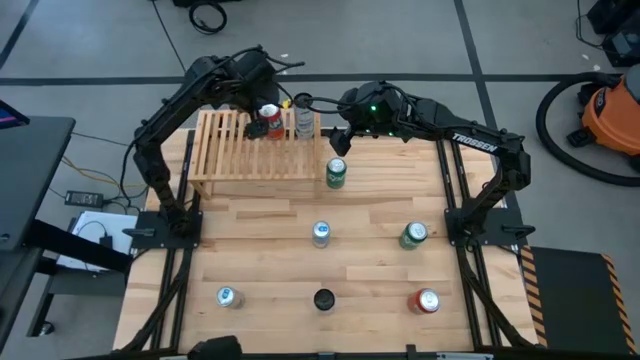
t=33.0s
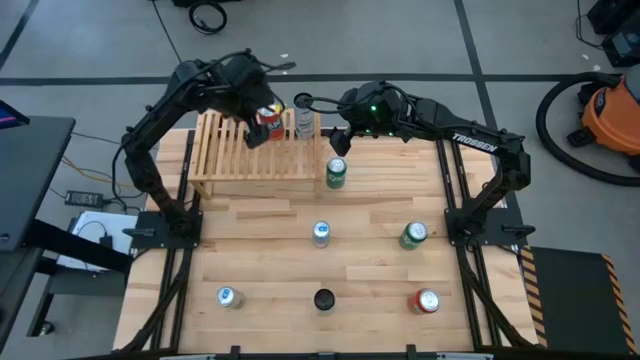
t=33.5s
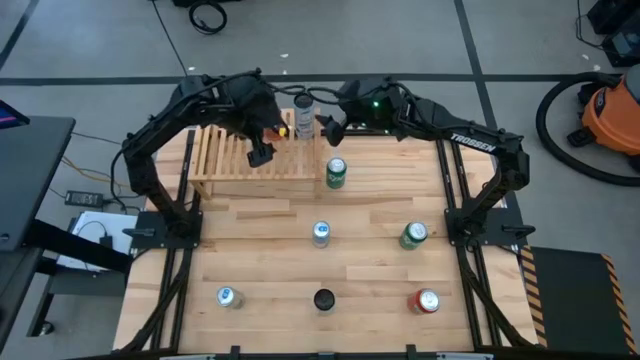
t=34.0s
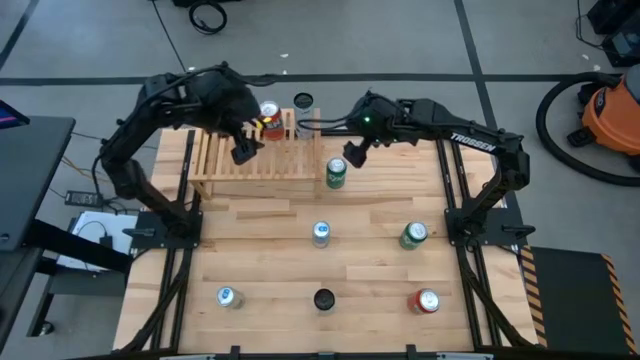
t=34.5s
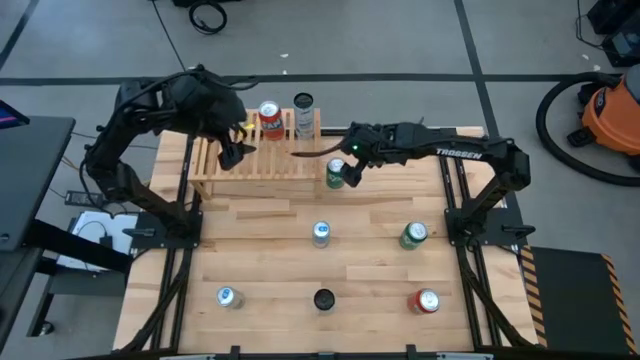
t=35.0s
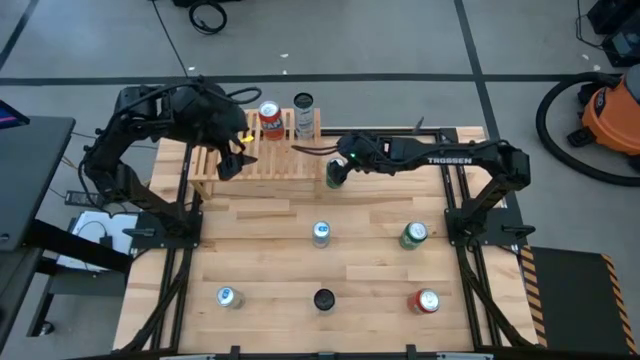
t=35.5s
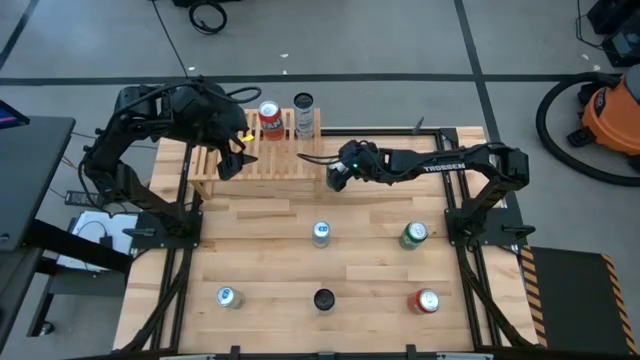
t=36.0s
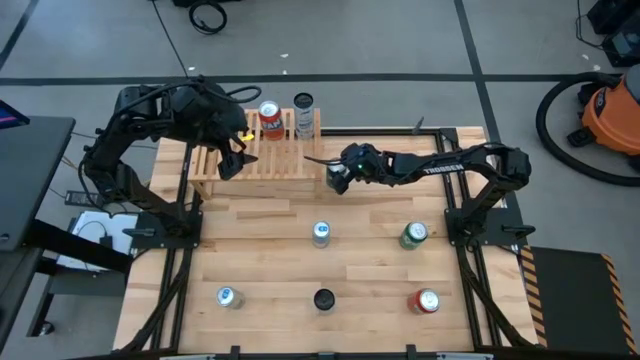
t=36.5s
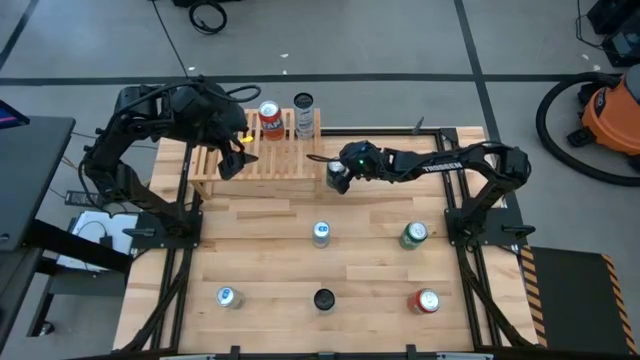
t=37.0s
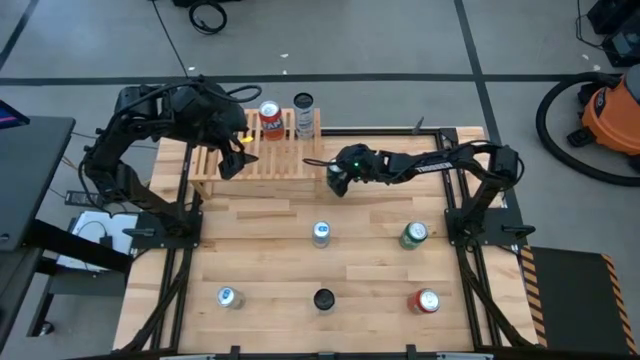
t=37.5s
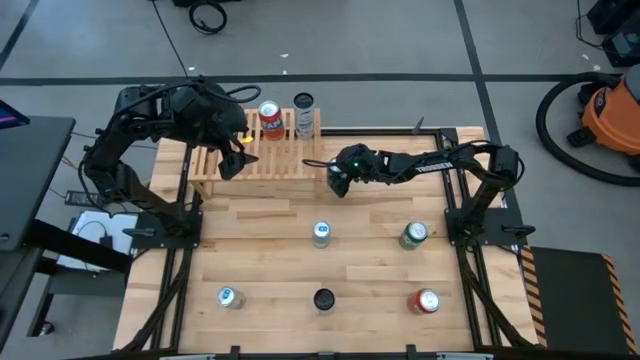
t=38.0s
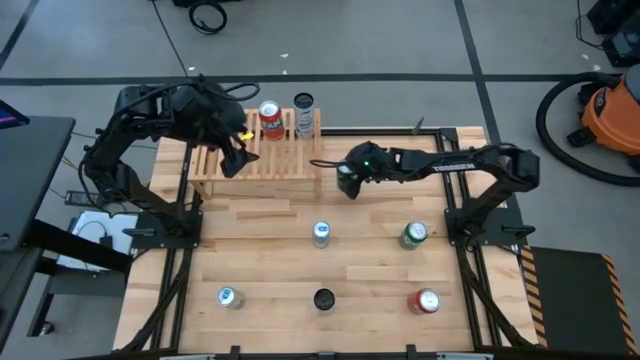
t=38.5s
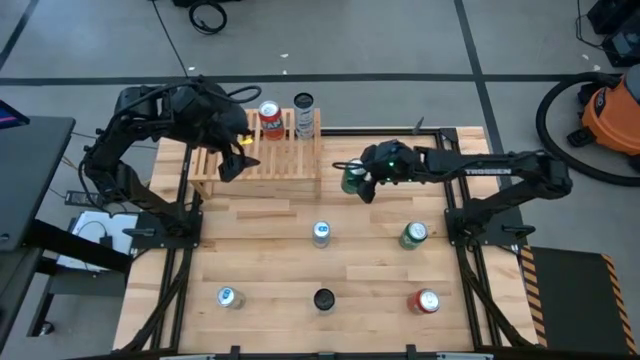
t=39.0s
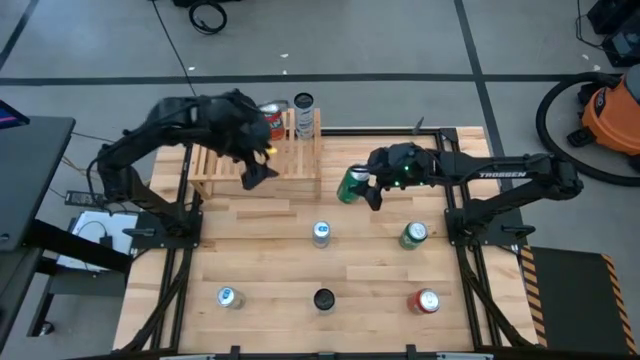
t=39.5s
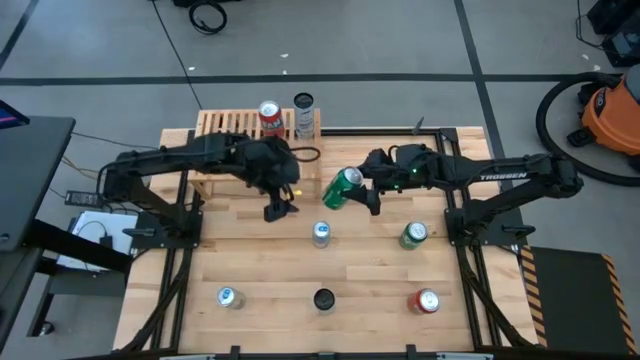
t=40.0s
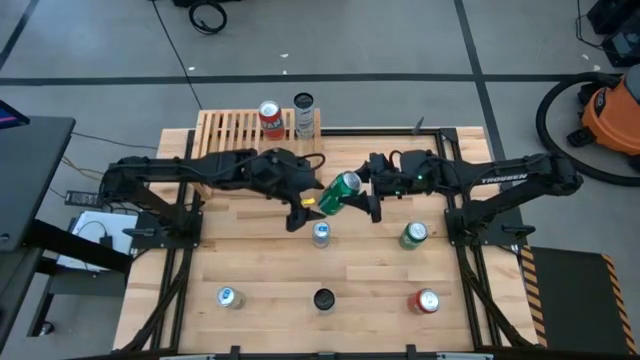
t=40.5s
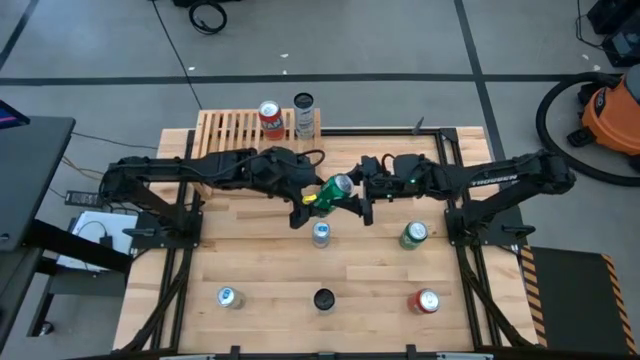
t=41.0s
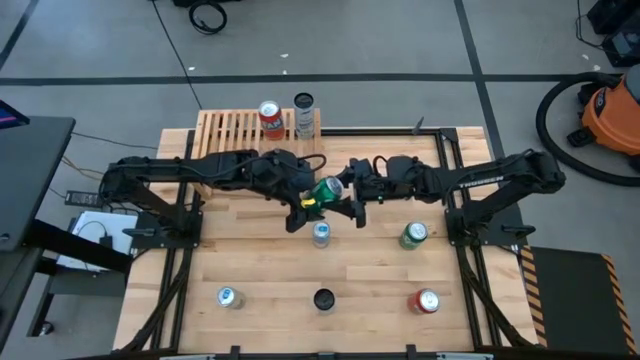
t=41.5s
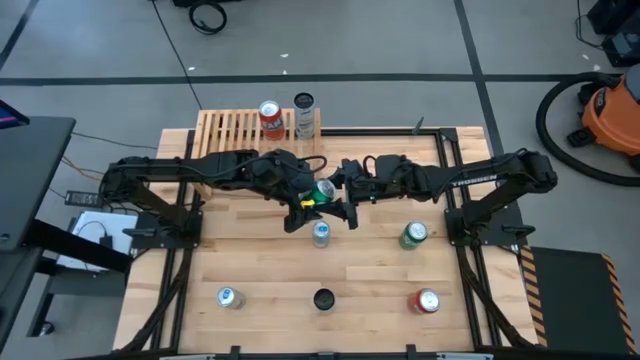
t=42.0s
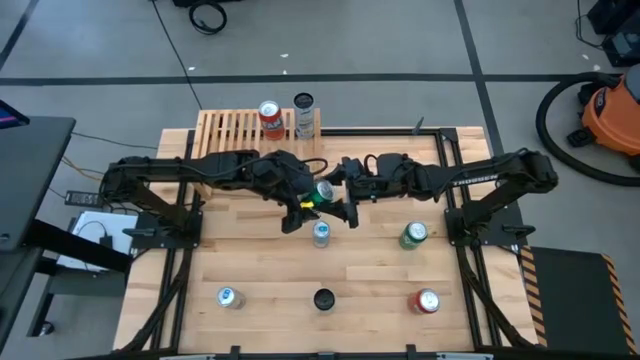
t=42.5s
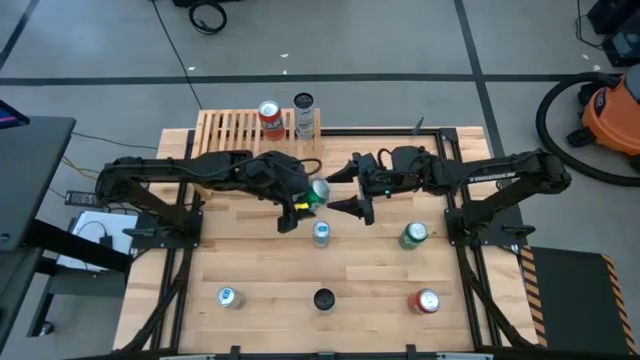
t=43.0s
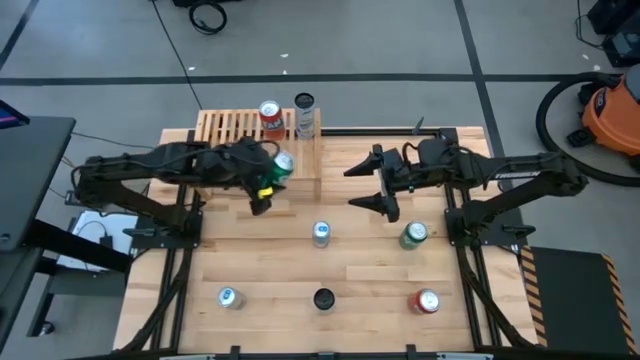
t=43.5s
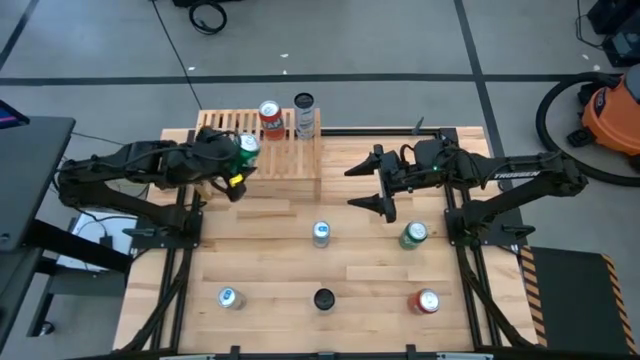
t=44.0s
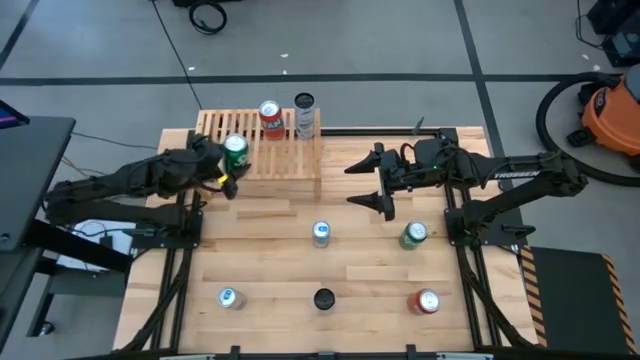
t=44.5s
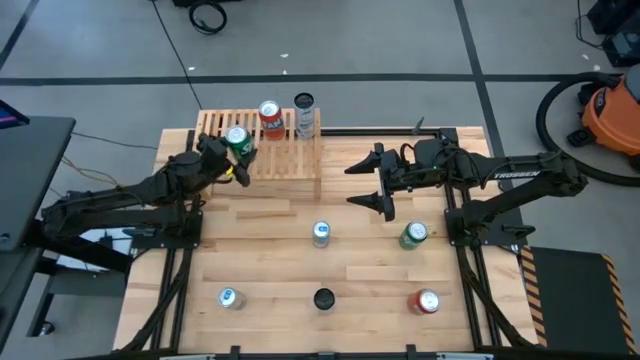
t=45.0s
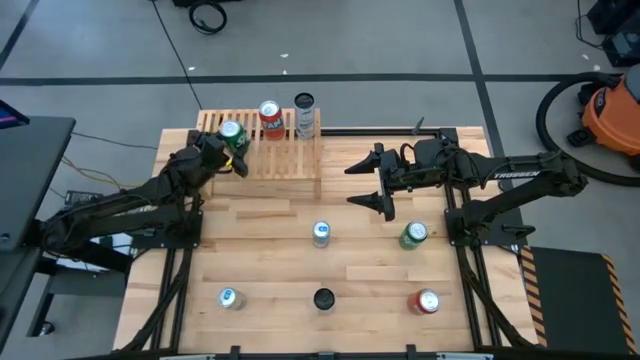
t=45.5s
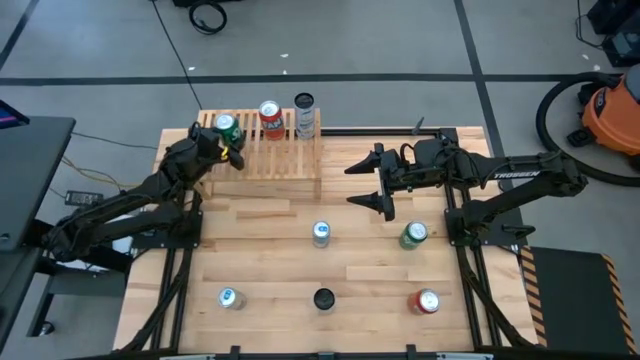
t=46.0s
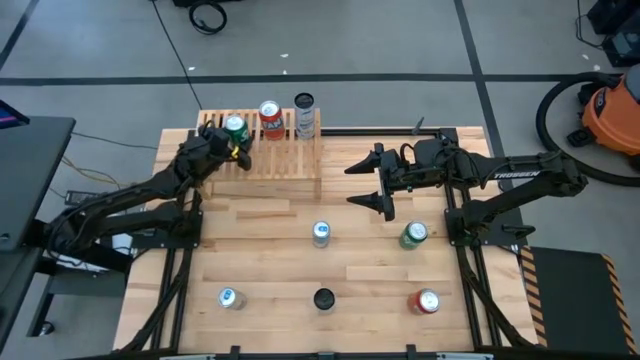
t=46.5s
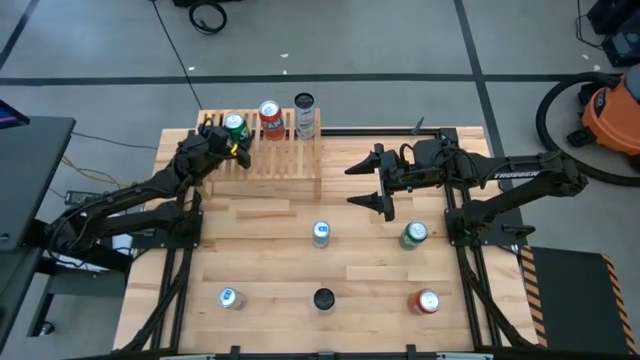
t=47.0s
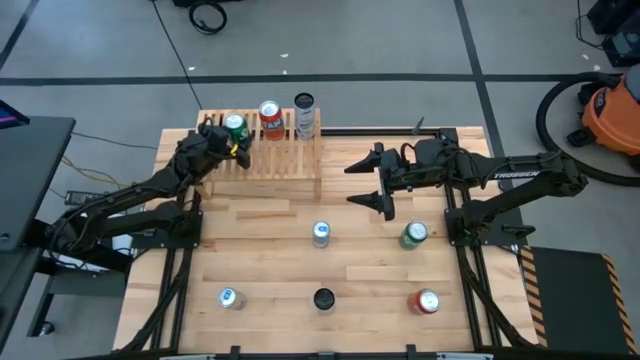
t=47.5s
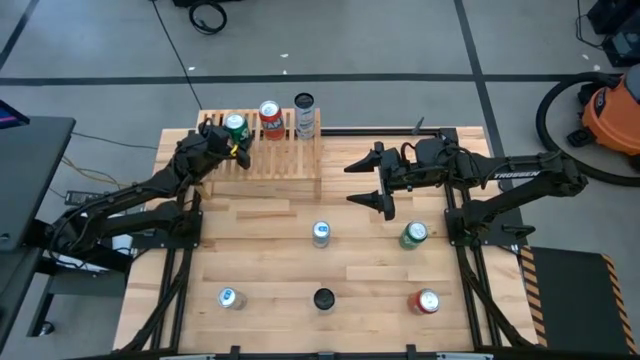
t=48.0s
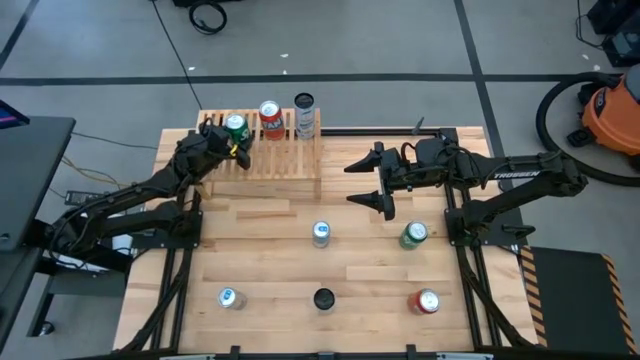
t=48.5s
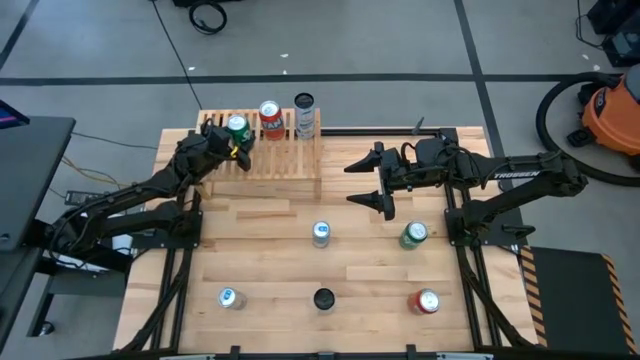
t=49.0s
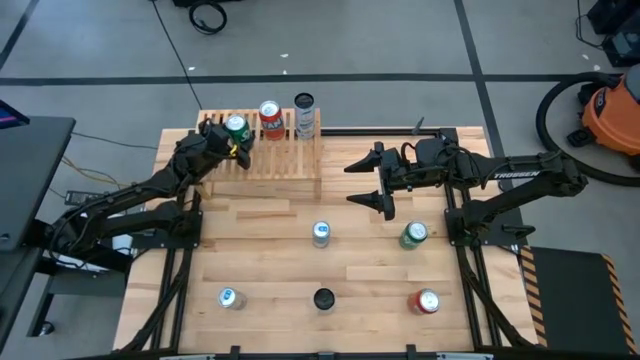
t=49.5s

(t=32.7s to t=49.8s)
Task: Place canned beverage on shelf
Put the top green soda can on the shelf

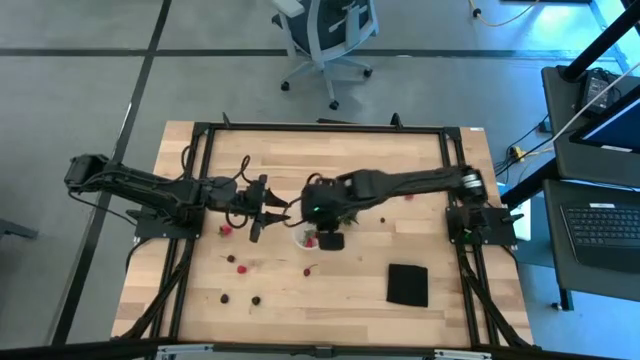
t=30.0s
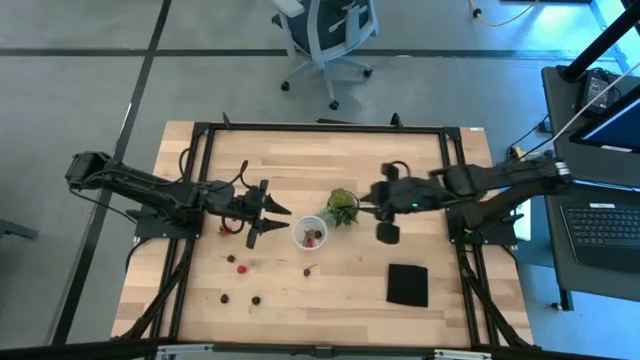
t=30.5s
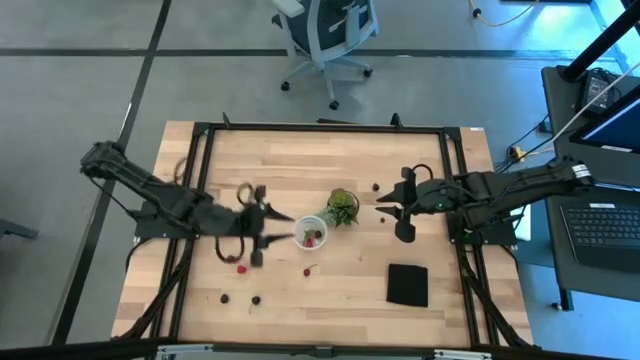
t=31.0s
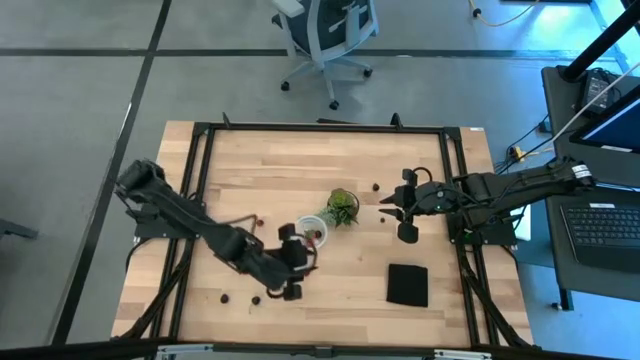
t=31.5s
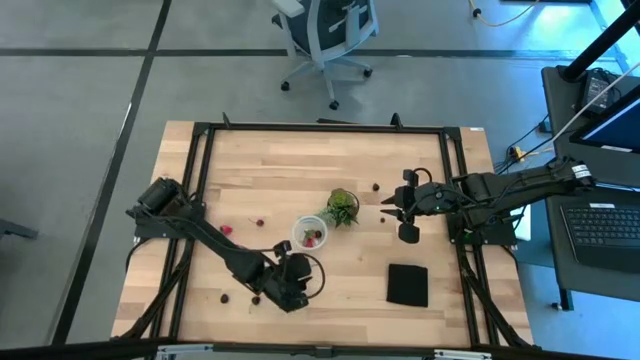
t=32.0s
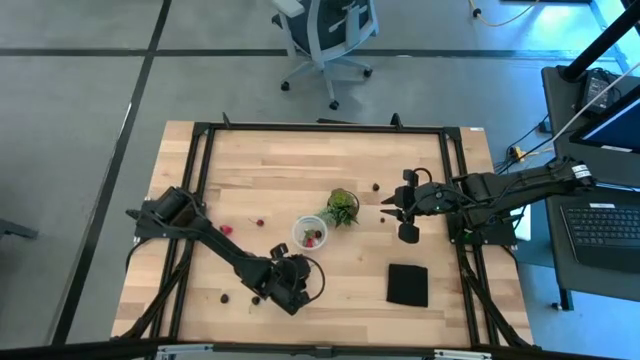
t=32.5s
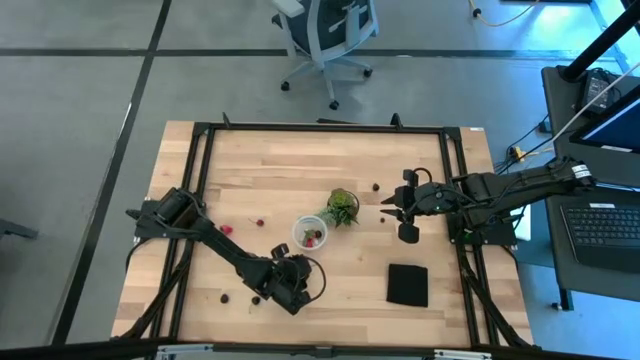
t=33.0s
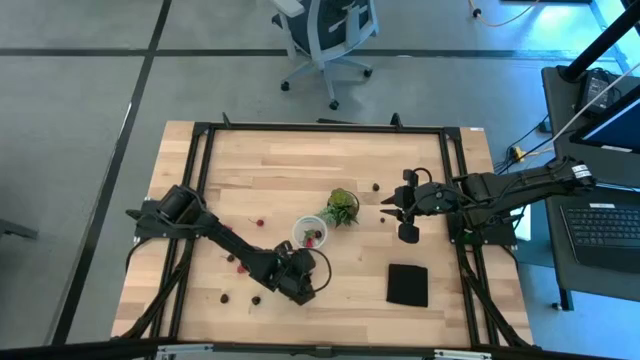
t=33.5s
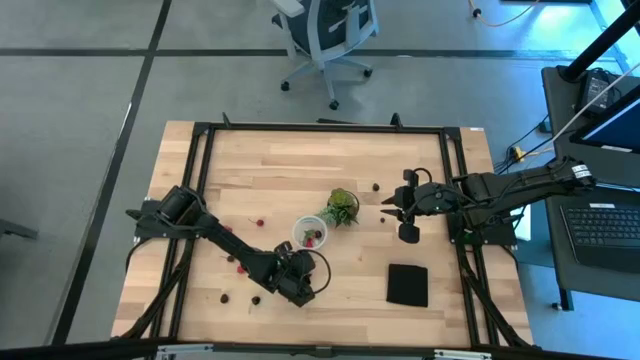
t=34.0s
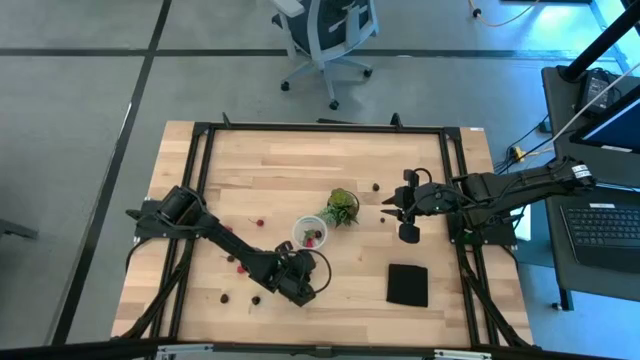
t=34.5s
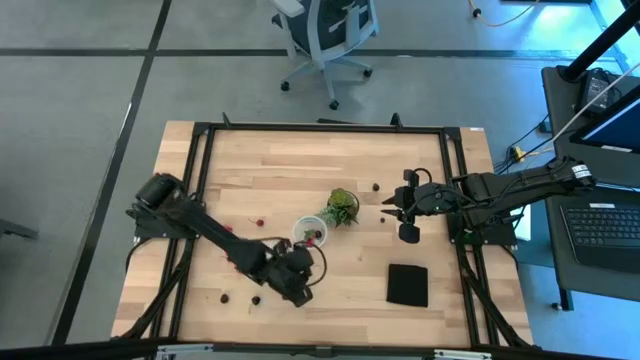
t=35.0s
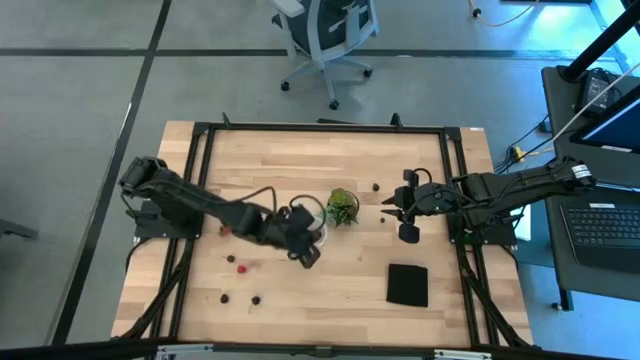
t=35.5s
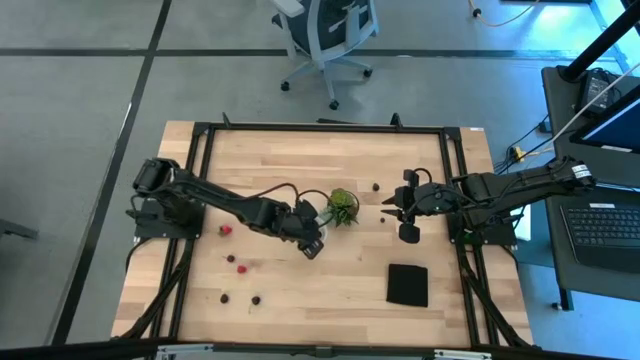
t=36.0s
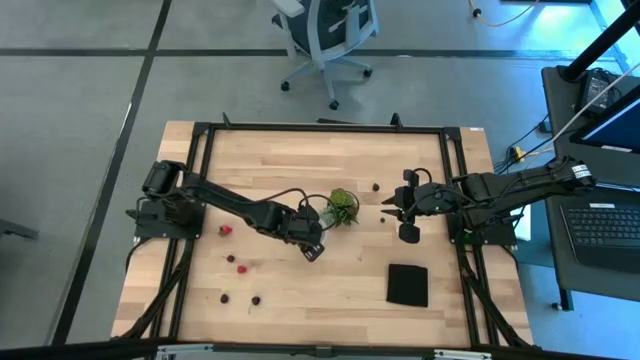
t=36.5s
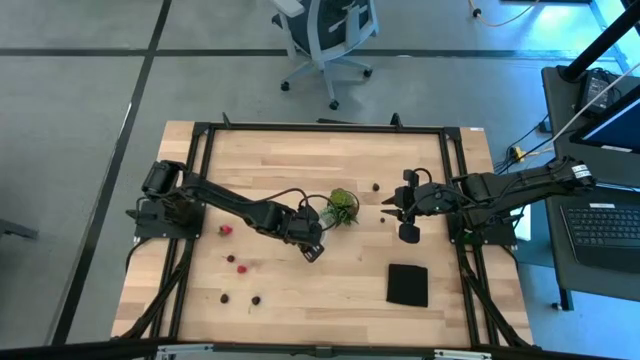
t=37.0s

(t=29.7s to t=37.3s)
Task: Pick and placing Produce into tupperware
Put the bottom red cherry into the transparent container
